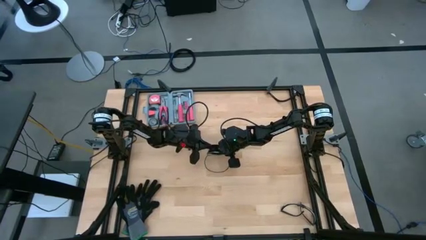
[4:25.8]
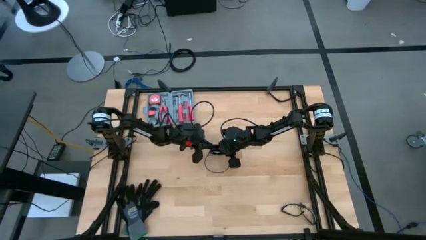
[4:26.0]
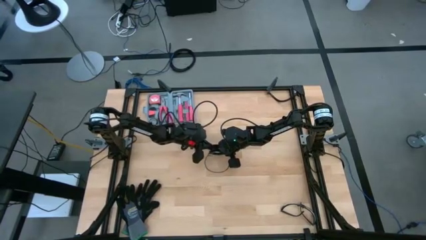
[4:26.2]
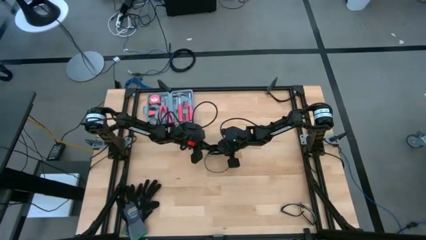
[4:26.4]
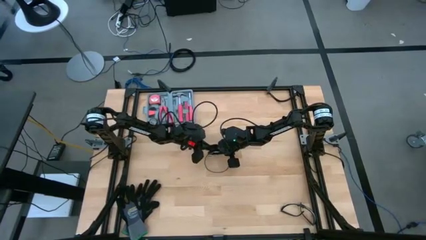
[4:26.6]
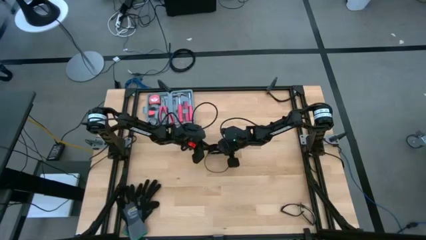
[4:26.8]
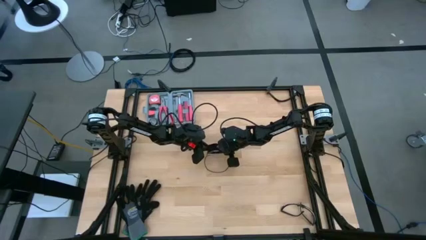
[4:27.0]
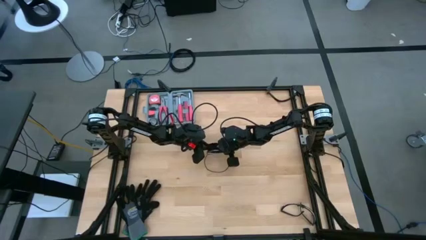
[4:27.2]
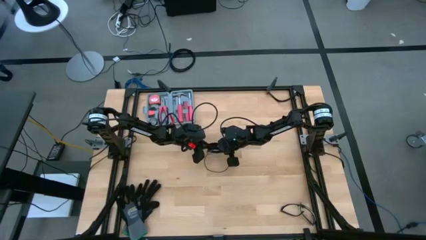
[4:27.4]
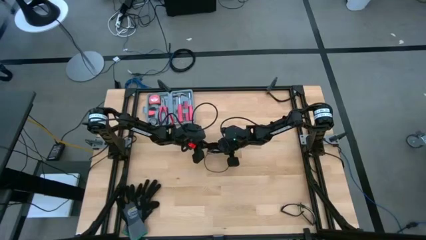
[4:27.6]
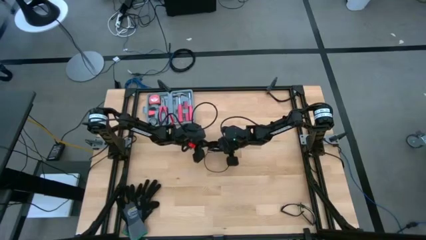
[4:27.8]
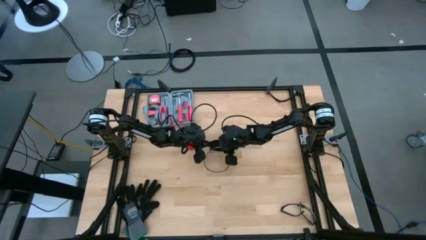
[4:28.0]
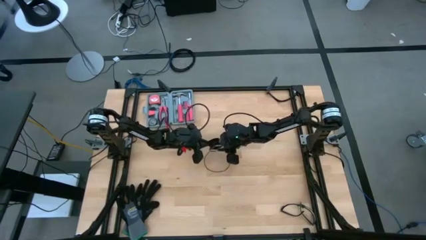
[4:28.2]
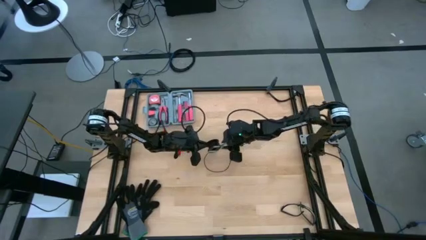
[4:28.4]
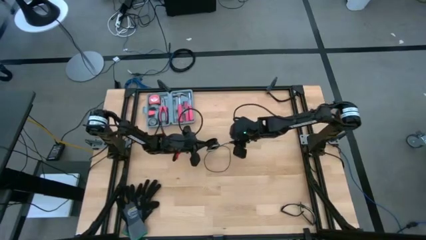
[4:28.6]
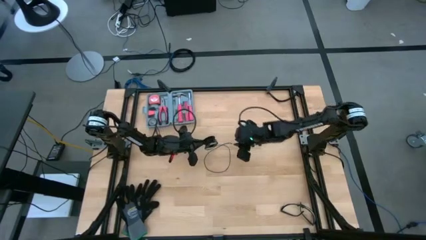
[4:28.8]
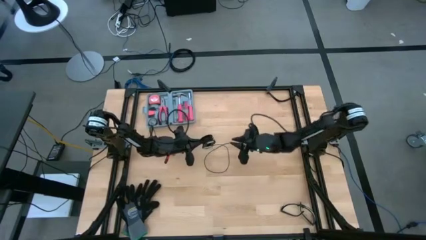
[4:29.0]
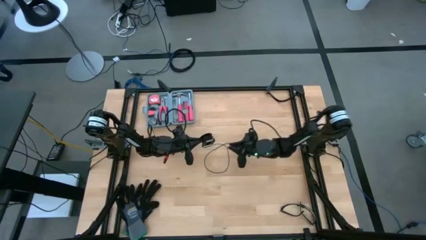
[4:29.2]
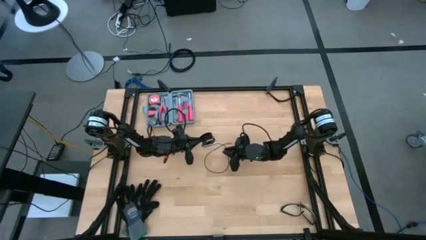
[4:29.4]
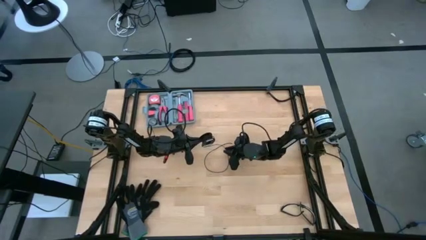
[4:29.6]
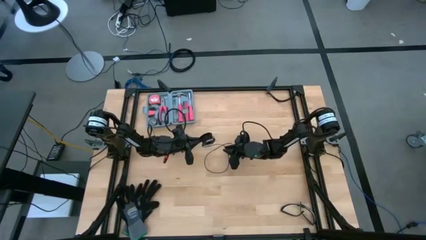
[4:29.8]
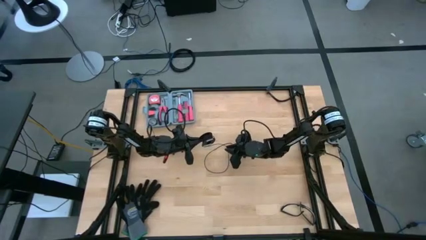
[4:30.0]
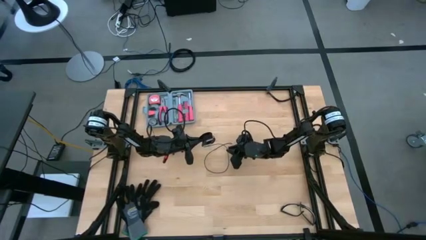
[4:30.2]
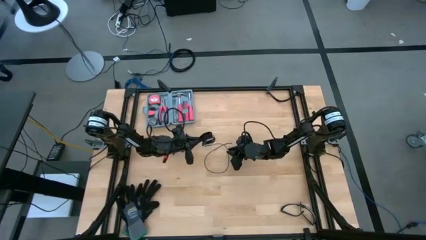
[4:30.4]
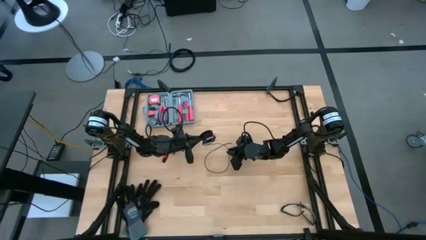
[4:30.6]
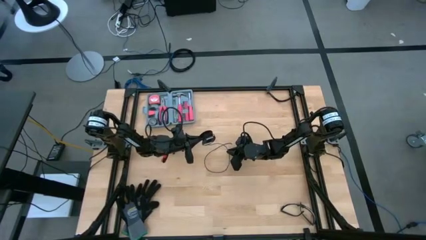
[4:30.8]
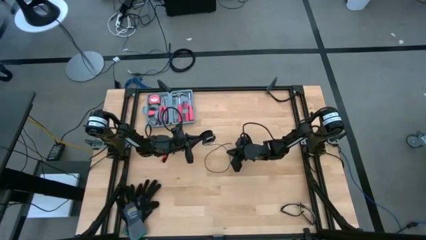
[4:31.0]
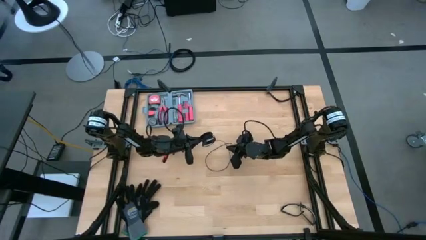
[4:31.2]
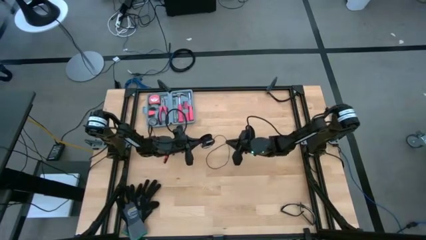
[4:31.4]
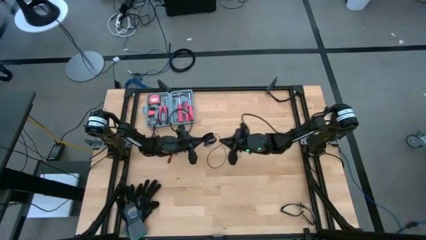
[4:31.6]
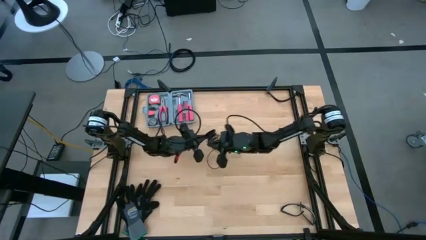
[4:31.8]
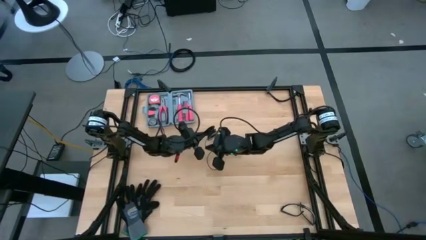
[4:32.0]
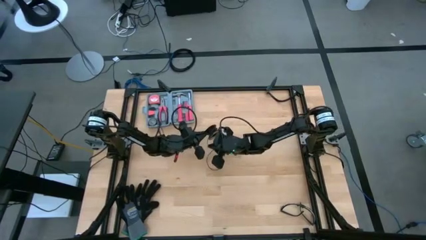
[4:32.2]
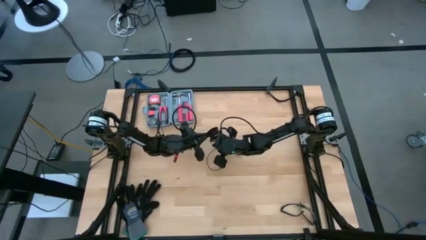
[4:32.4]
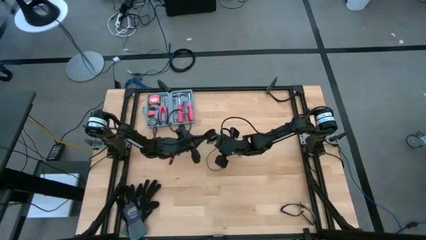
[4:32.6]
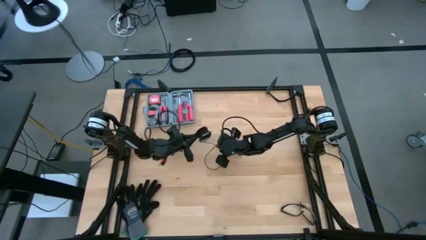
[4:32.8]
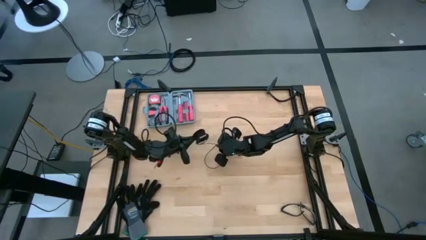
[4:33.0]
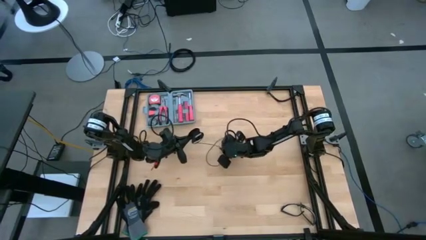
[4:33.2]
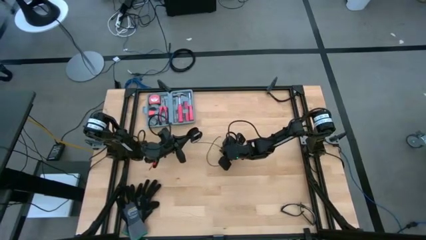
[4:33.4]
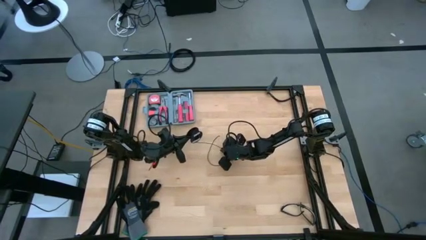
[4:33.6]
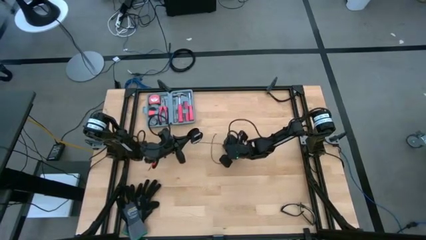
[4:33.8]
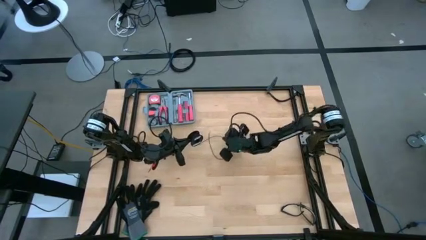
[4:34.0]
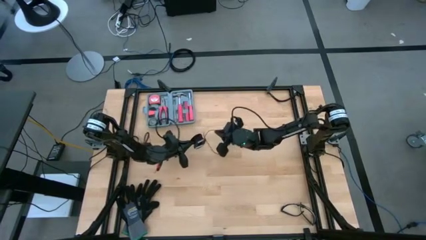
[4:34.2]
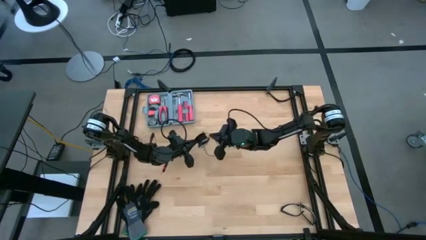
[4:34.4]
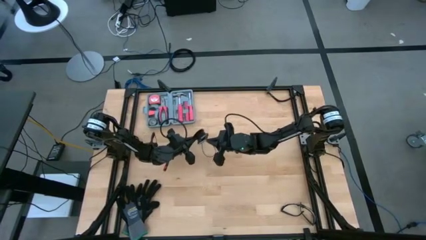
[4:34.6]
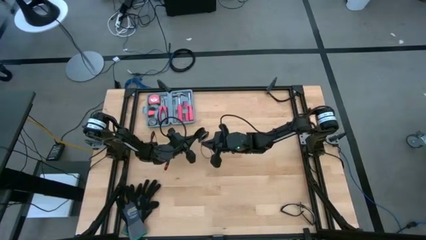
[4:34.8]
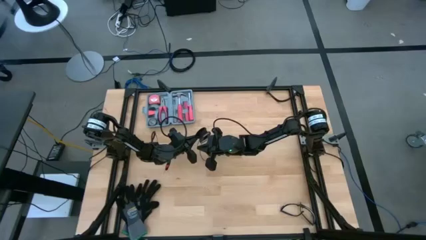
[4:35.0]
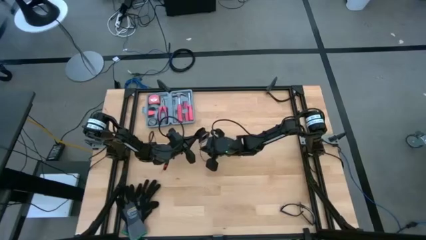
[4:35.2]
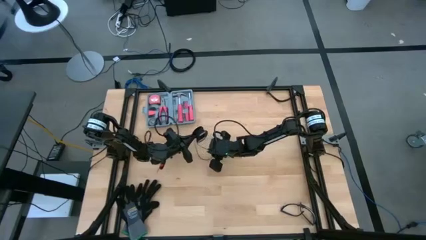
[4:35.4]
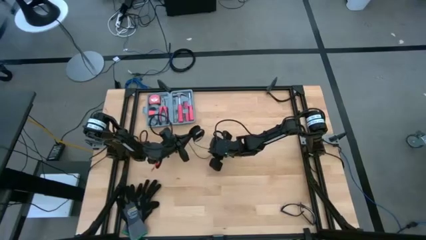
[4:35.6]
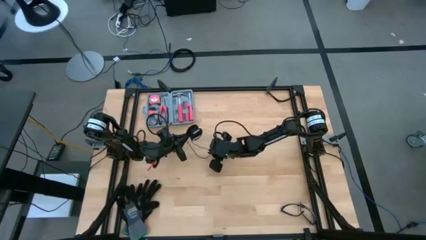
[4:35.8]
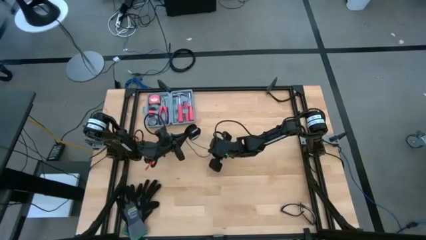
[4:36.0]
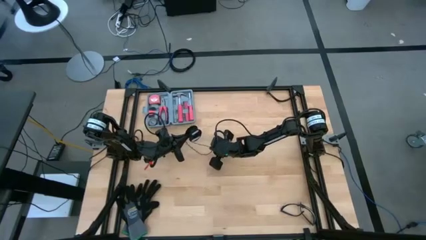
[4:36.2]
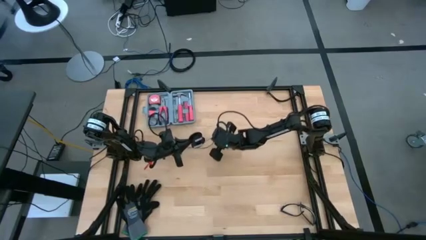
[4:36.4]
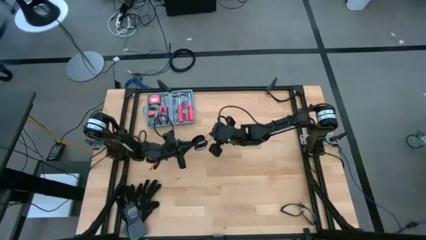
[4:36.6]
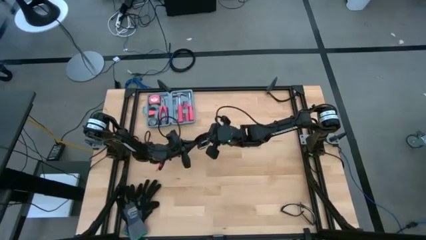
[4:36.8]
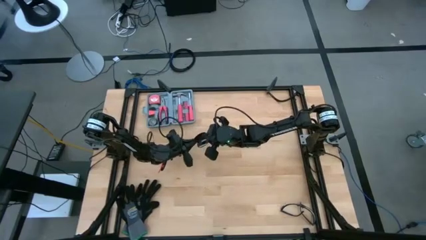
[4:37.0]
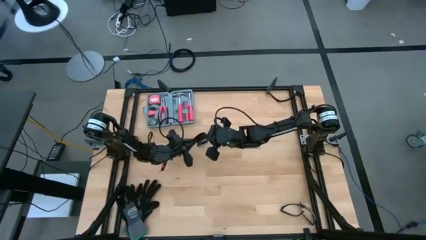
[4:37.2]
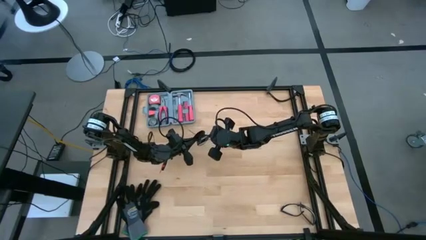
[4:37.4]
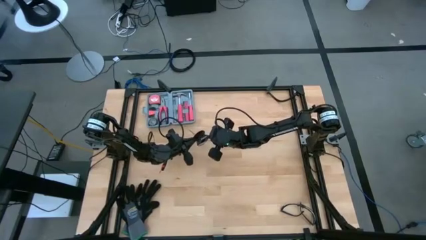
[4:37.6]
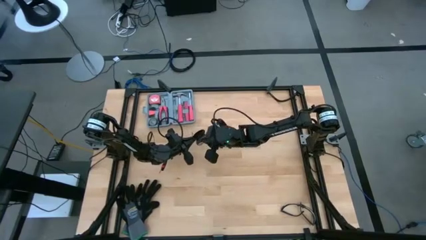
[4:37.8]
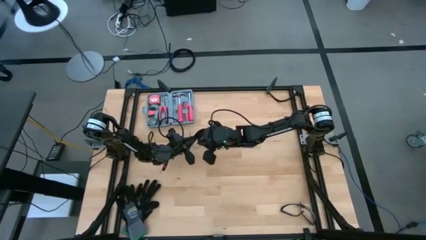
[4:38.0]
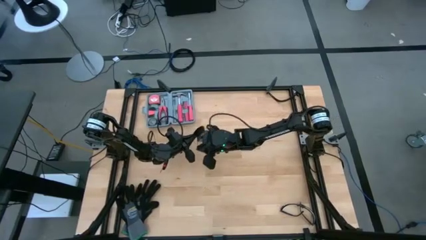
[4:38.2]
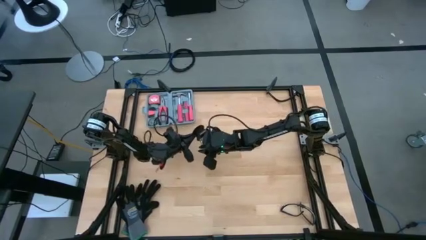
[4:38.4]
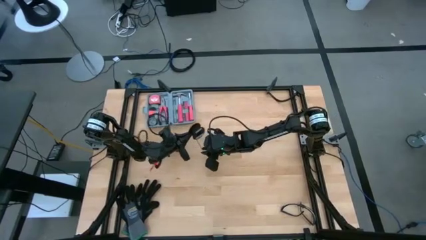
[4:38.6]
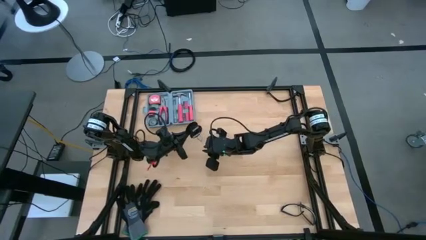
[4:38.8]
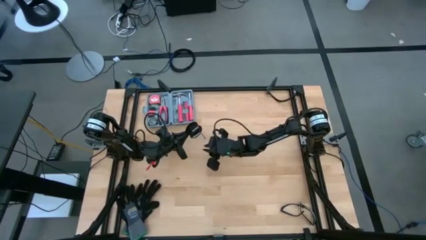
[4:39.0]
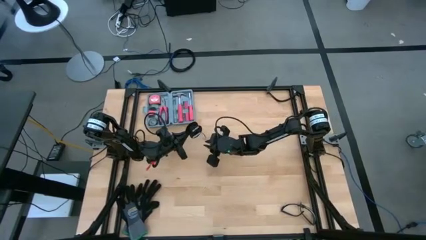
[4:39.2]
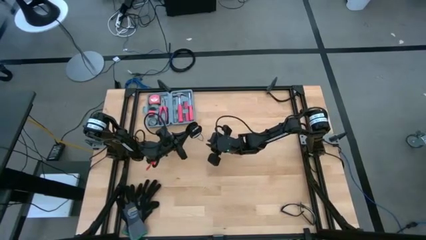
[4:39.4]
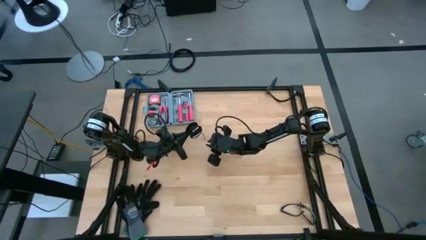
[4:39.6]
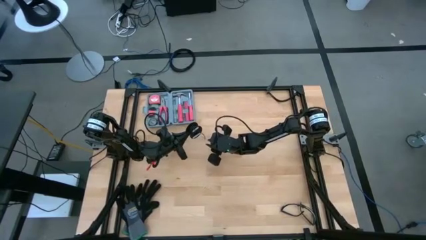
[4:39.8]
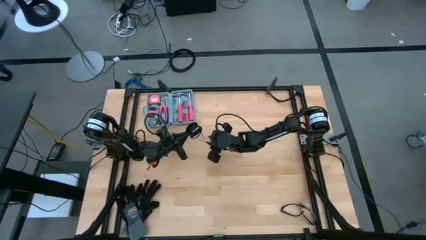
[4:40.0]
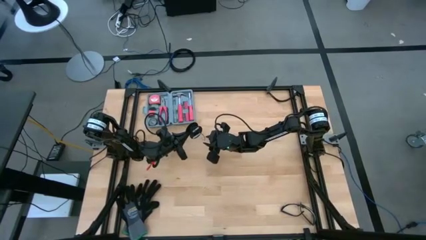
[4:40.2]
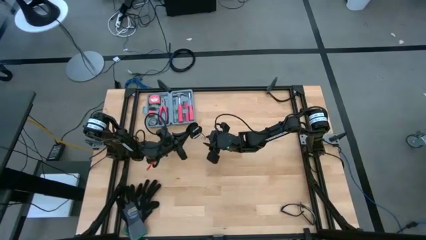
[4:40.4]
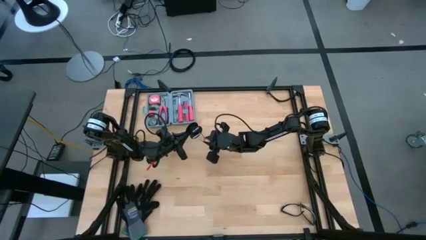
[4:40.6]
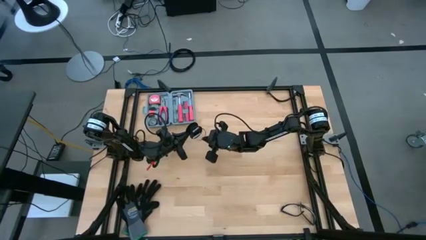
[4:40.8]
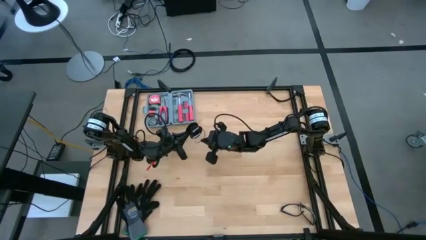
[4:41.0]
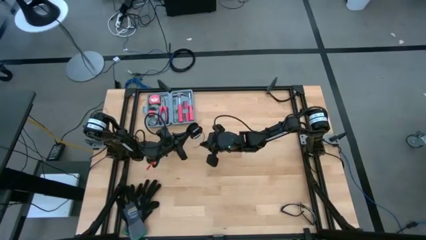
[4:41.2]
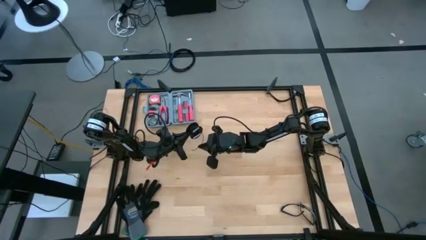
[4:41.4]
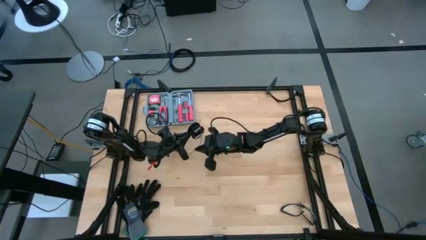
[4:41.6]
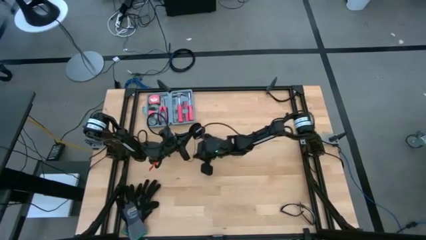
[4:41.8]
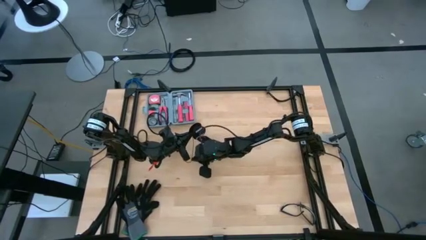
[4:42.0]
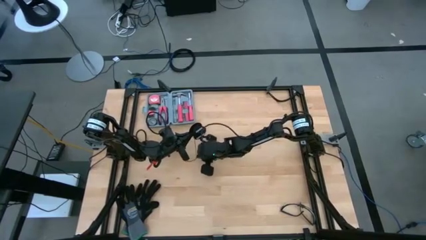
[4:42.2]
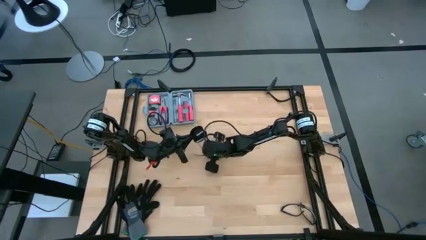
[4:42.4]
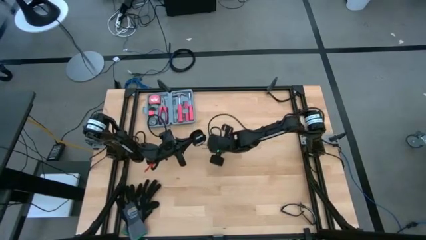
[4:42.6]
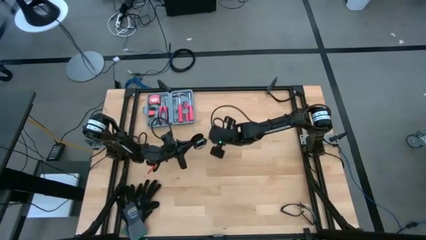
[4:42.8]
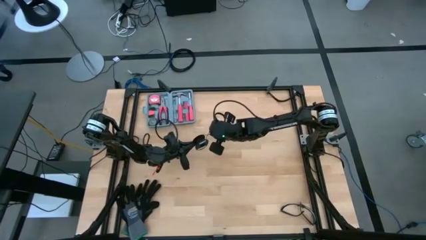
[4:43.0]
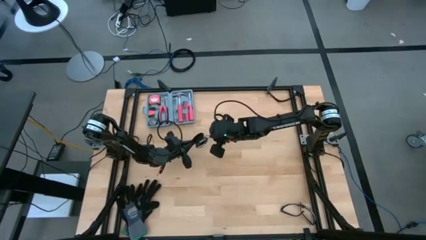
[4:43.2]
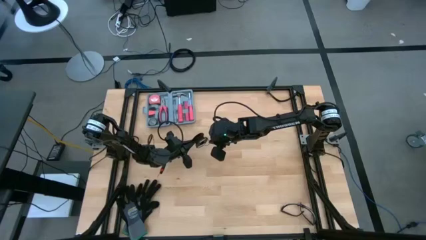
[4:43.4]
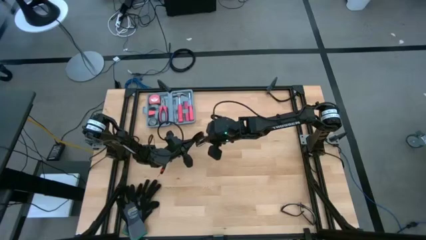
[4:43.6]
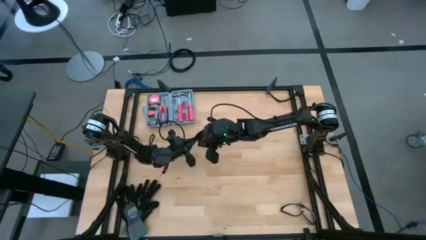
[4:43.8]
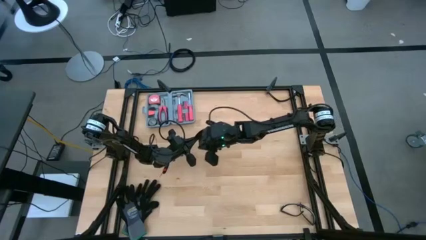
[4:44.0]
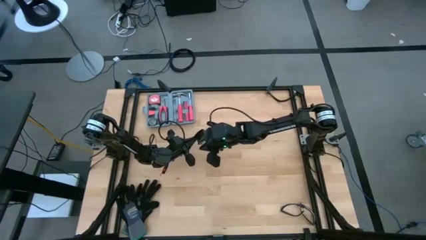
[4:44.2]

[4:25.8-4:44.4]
Task: Coil cords
Coil the black wire onto the spool
